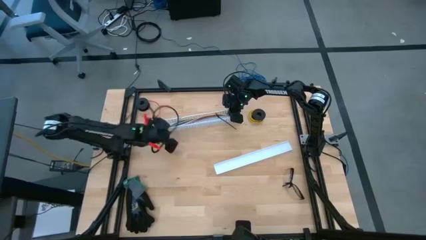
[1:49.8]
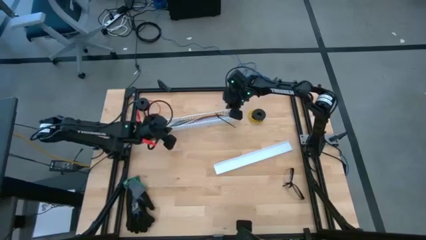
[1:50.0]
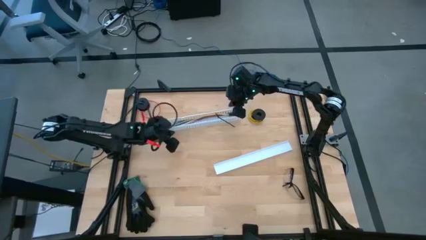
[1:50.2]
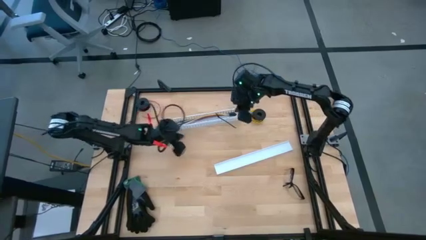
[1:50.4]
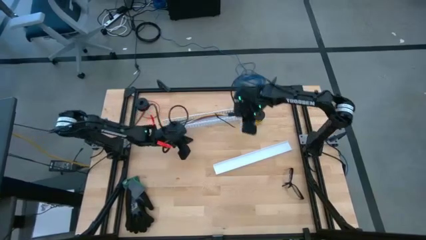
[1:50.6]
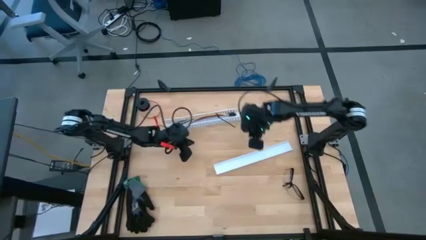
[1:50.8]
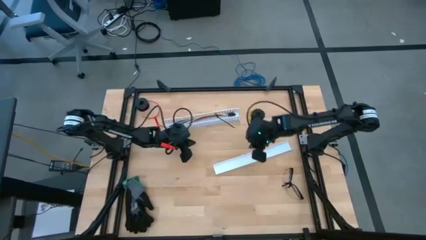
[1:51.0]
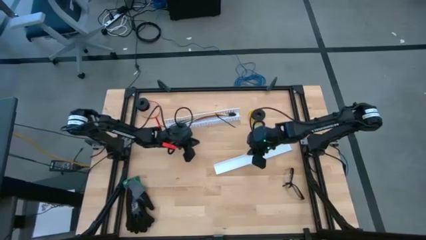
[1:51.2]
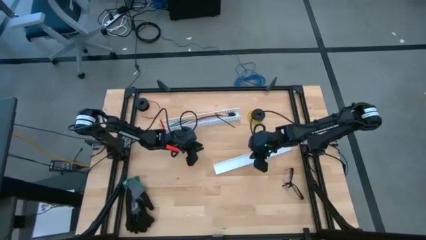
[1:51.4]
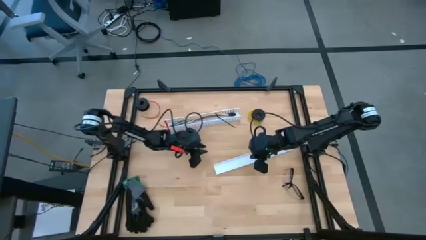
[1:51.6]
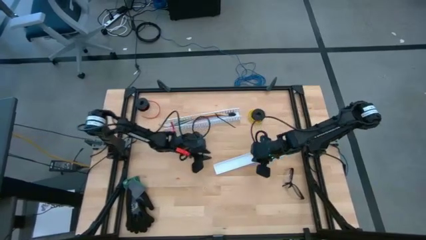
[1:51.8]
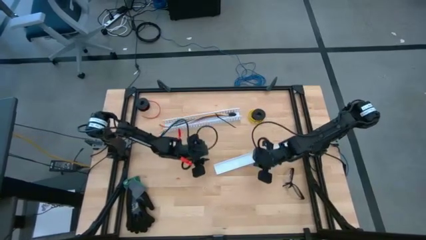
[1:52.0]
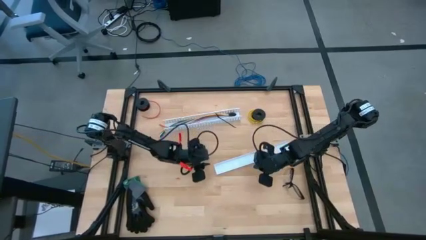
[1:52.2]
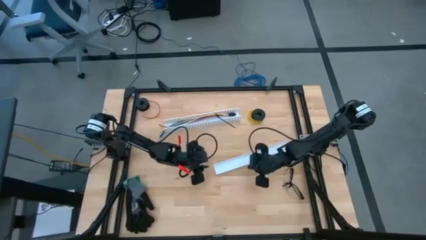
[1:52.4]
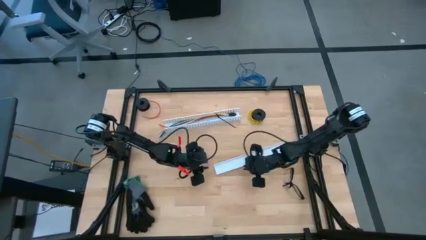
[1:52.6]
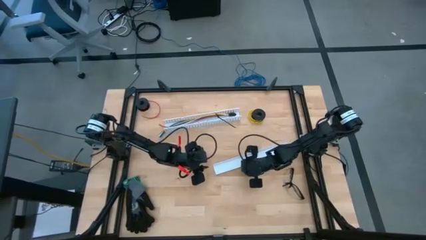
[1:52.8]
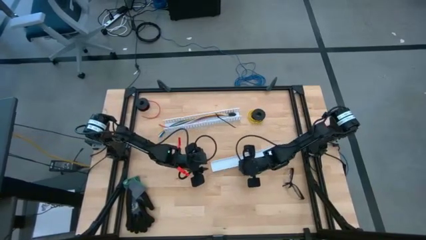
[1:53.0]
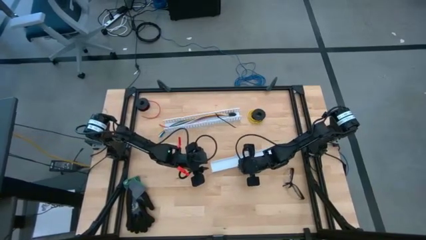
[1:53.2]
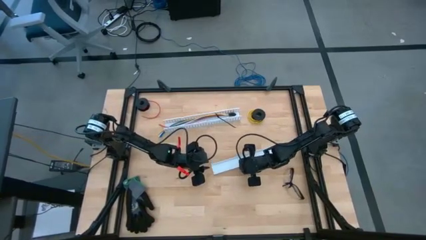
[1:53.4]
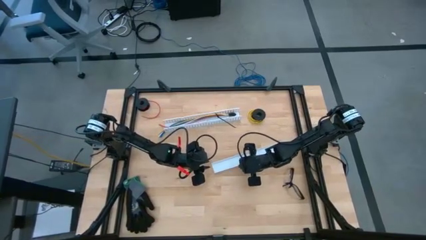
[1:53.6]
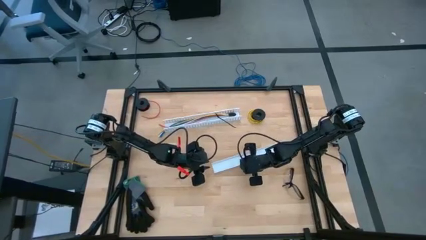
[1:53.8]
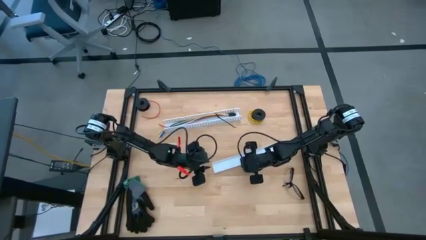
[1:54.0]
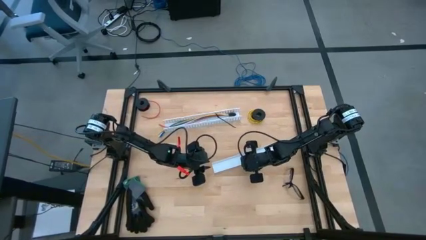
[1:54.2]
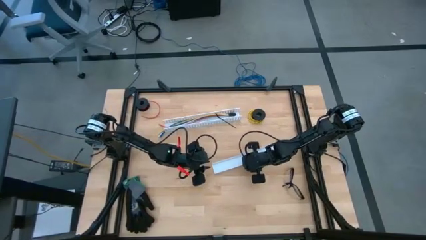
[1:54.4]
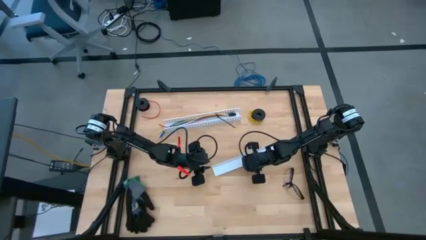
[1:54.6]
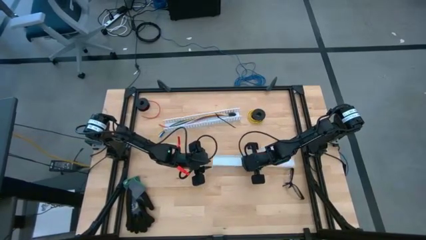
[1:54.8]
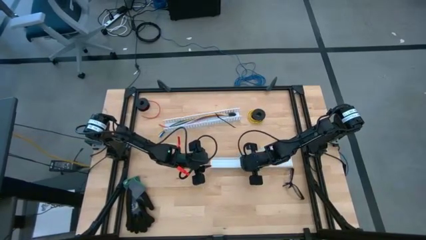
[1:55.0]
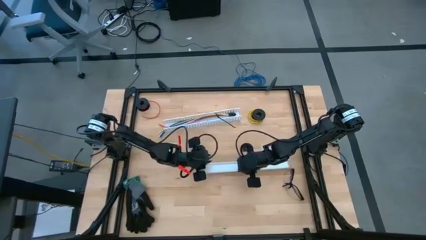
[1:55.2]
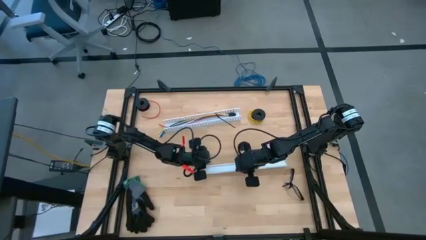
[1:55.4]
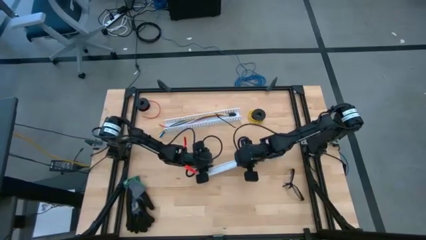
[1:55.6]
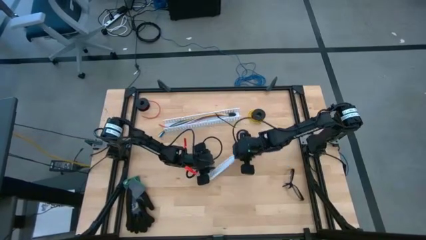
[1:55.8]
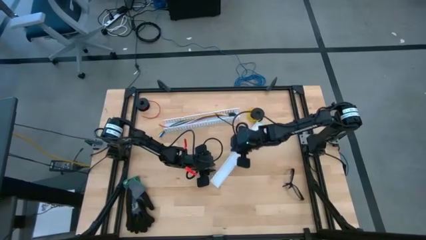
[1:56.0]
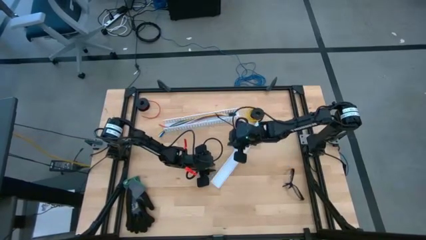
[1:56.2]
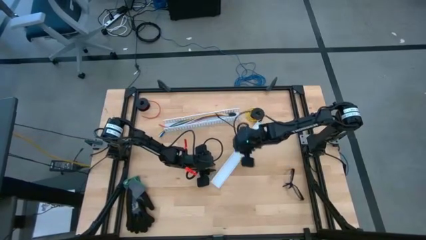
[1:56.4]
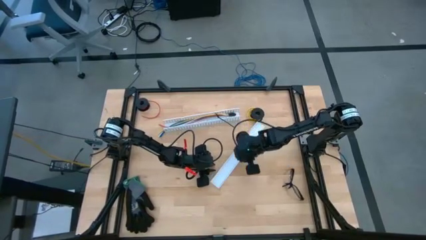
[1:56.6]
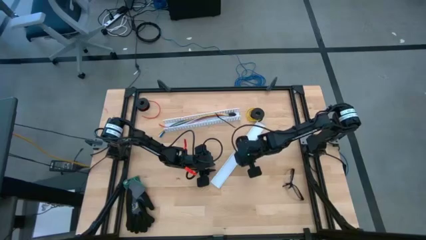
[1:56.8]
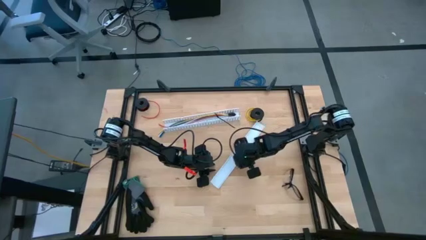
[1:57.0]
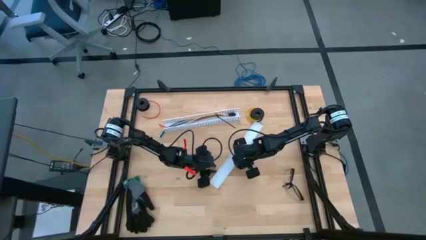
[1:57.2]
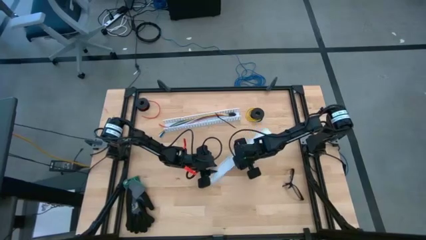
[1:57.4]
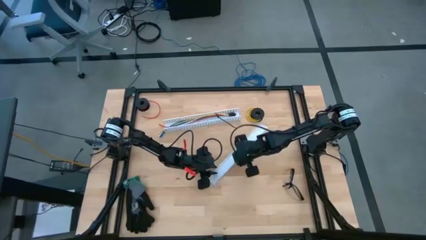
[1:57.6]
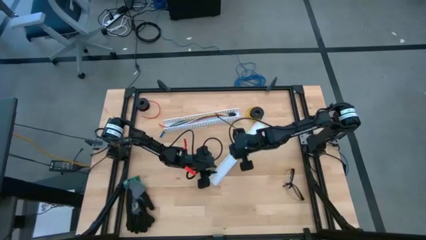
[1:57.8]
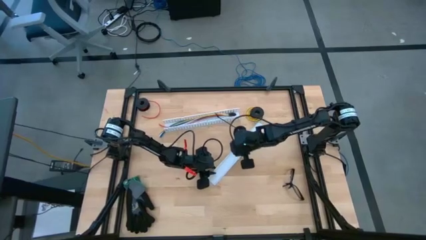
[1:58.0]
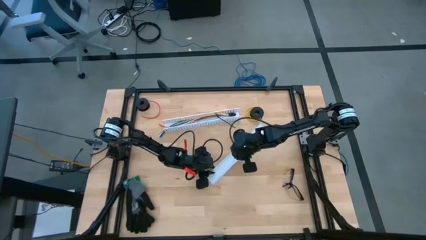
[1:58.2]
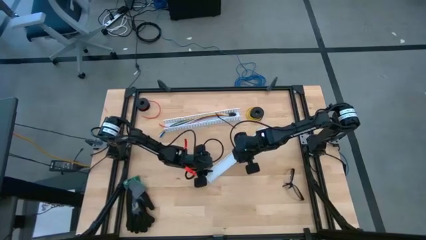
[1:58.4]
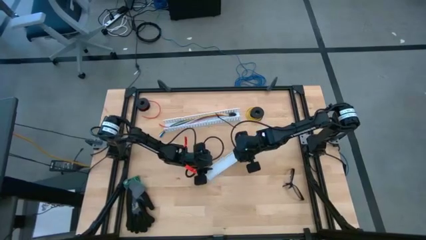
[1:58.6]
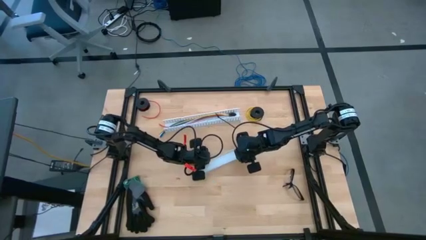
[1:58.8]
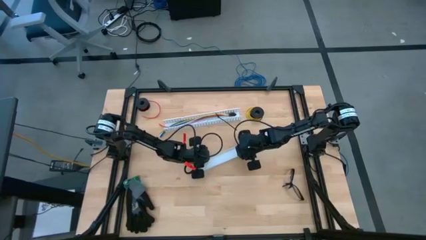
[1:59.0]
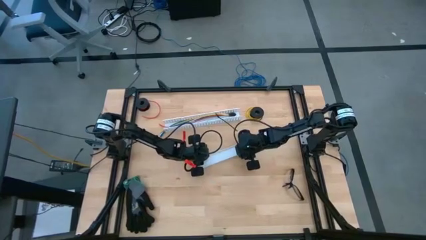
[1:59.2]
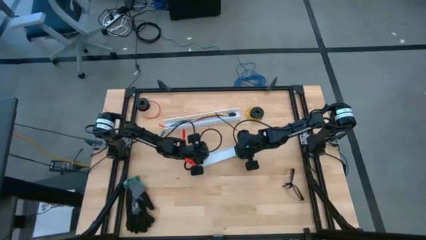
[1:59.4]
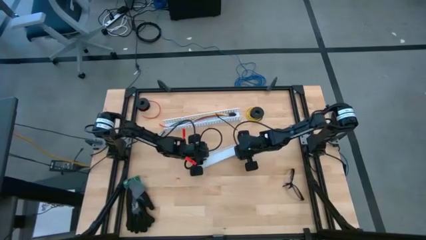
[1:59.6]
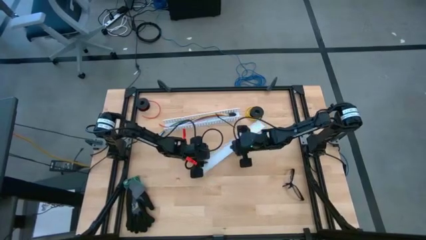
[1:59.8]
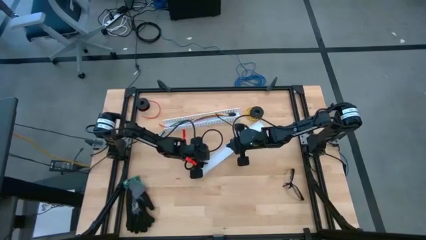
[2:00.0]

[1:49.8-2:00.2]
Task: Ziptie cables
Close the white cable duct
